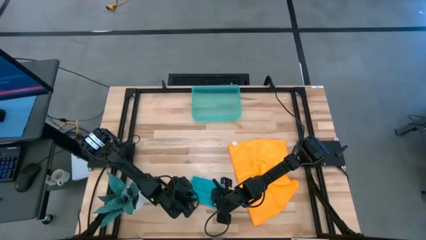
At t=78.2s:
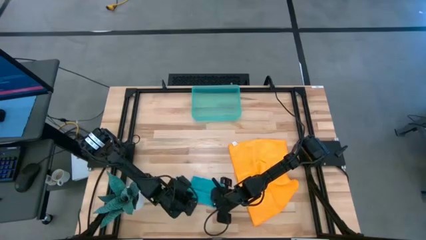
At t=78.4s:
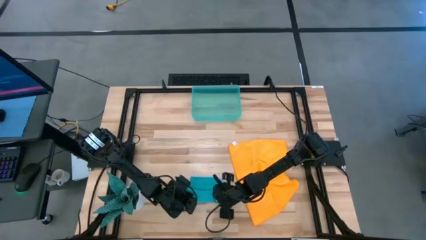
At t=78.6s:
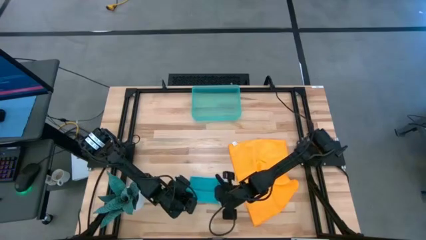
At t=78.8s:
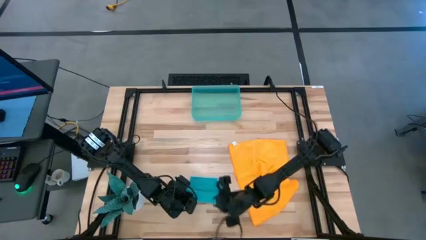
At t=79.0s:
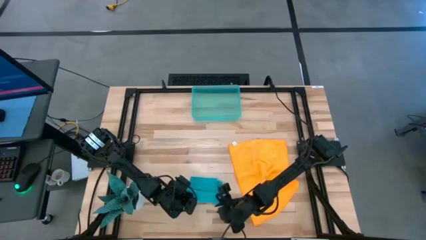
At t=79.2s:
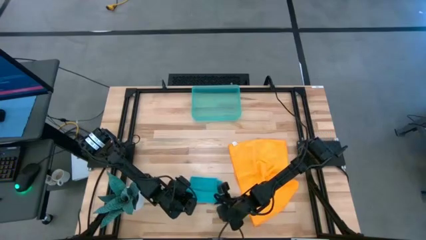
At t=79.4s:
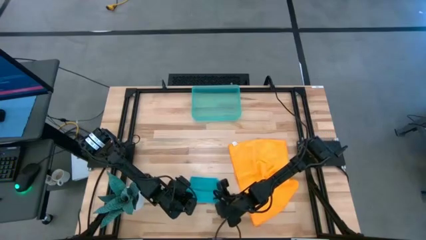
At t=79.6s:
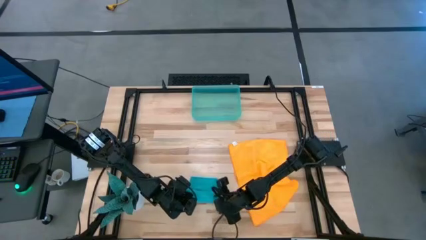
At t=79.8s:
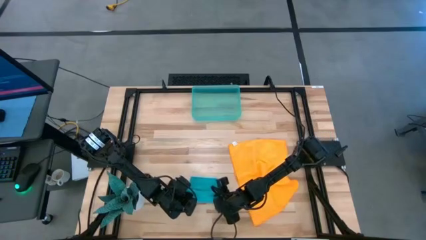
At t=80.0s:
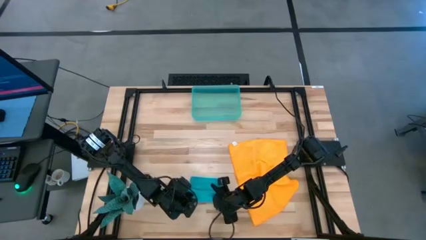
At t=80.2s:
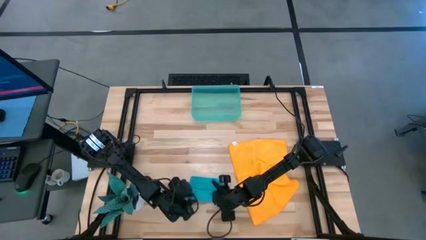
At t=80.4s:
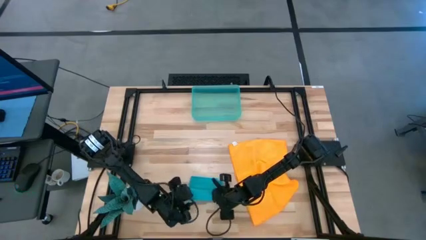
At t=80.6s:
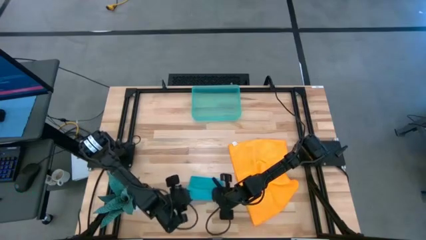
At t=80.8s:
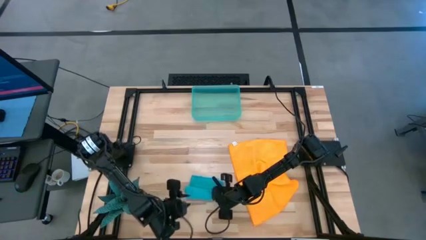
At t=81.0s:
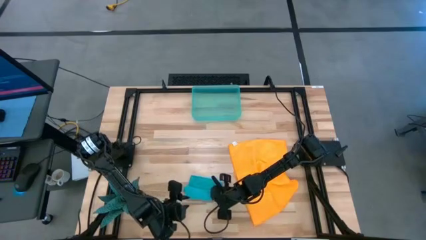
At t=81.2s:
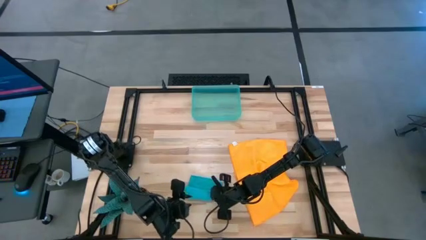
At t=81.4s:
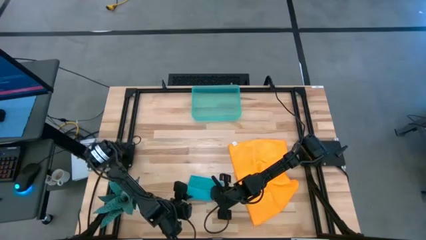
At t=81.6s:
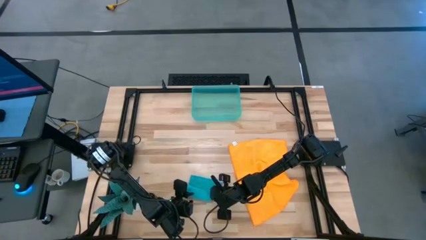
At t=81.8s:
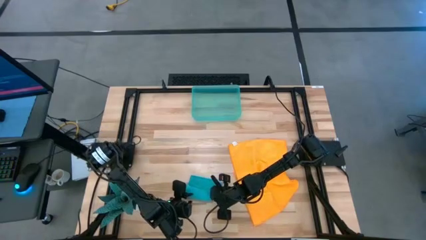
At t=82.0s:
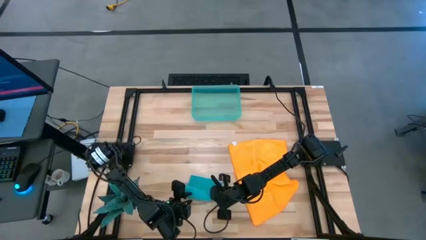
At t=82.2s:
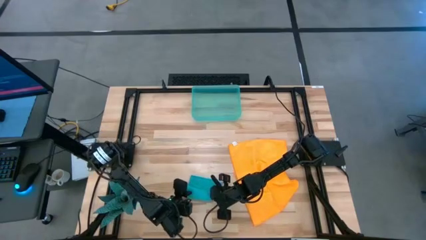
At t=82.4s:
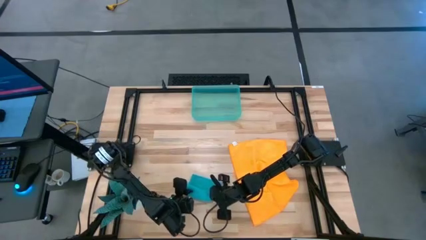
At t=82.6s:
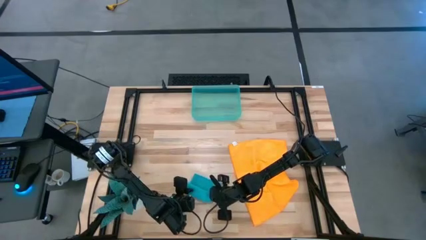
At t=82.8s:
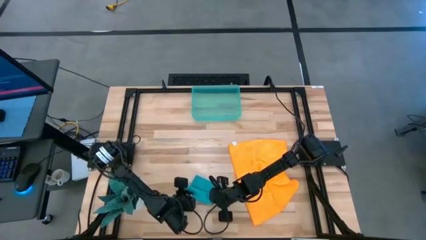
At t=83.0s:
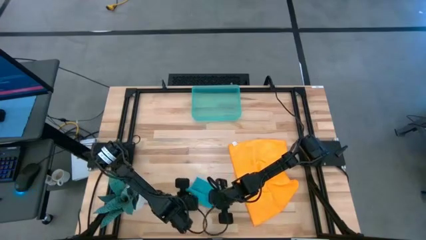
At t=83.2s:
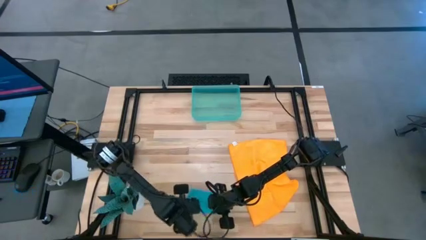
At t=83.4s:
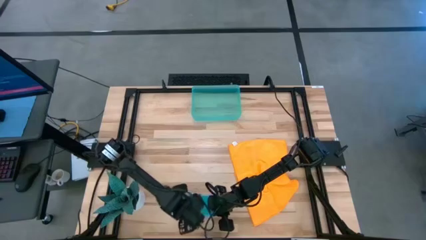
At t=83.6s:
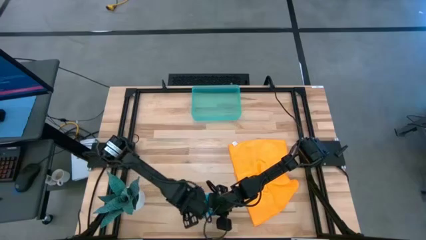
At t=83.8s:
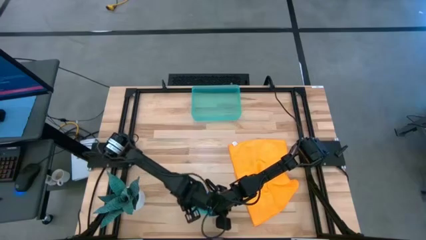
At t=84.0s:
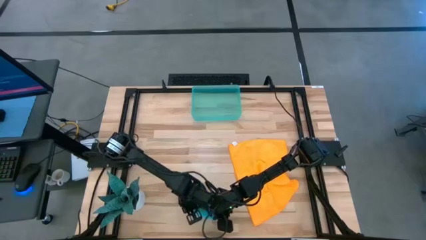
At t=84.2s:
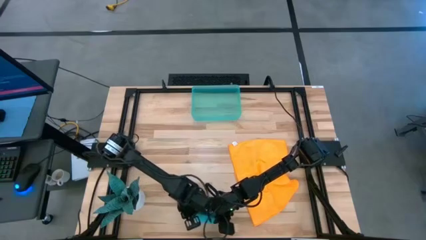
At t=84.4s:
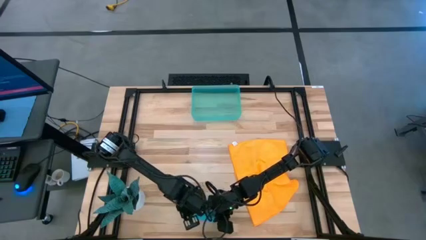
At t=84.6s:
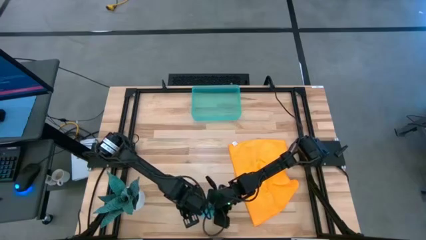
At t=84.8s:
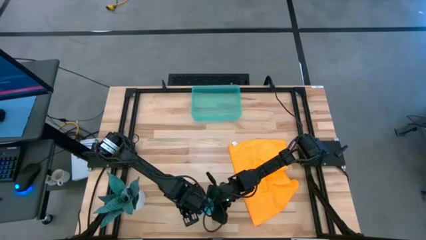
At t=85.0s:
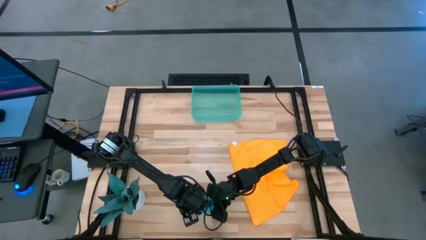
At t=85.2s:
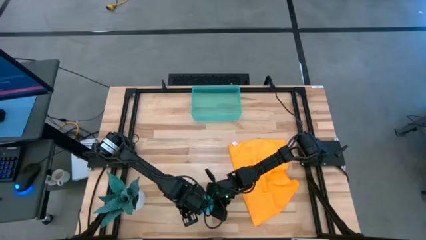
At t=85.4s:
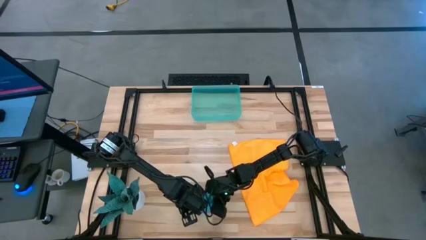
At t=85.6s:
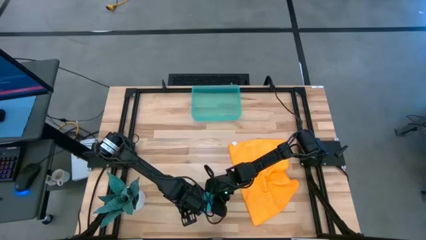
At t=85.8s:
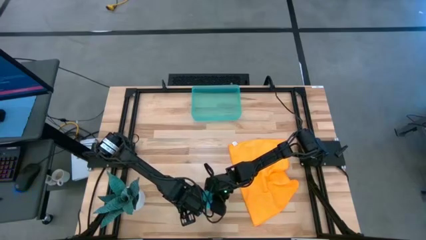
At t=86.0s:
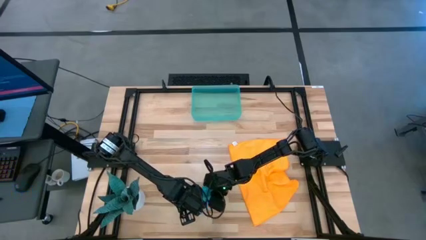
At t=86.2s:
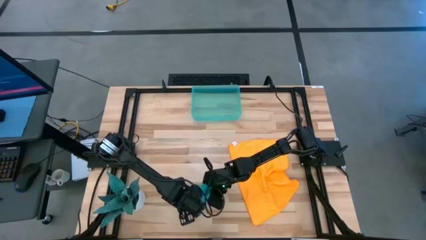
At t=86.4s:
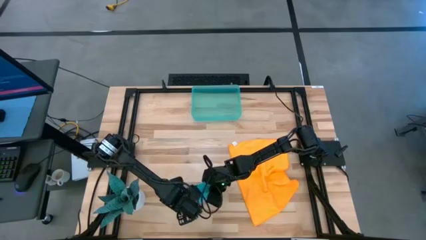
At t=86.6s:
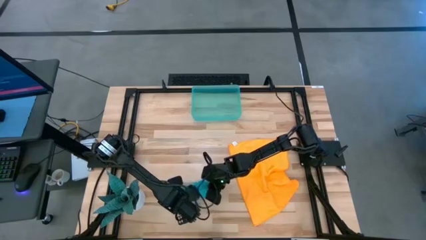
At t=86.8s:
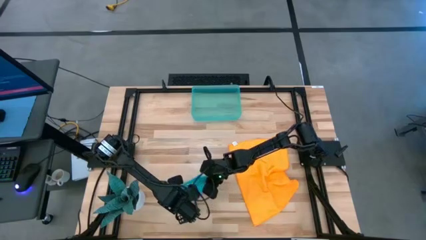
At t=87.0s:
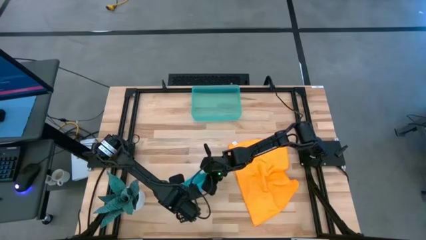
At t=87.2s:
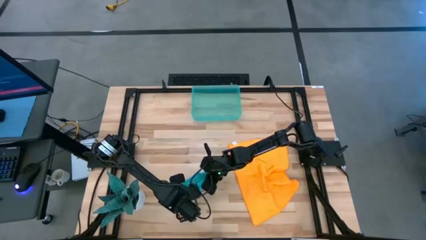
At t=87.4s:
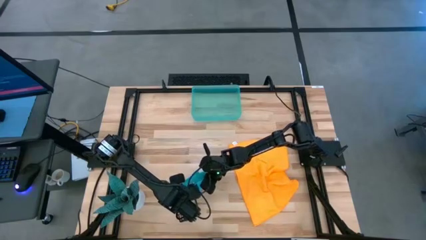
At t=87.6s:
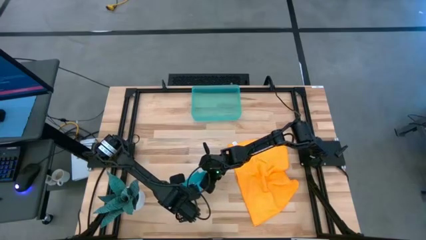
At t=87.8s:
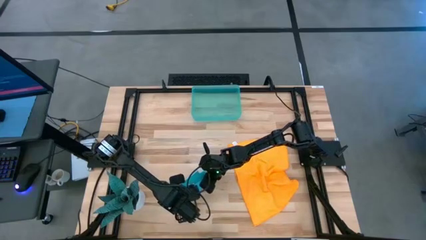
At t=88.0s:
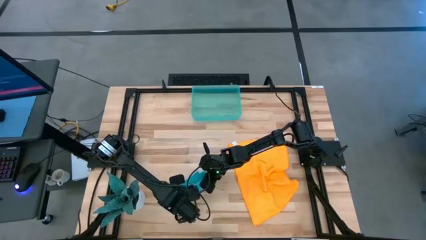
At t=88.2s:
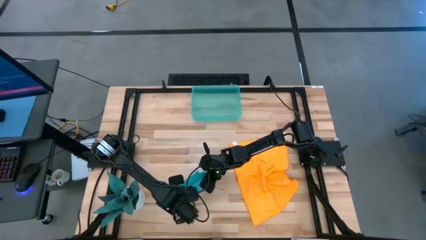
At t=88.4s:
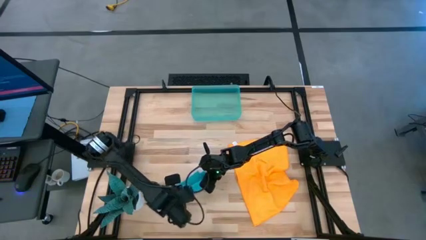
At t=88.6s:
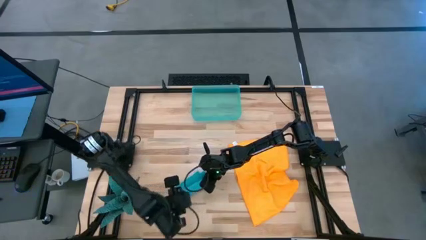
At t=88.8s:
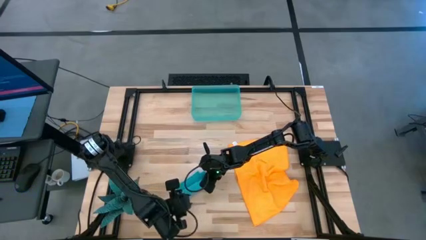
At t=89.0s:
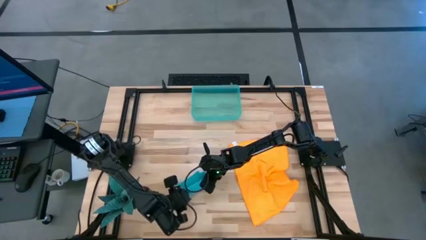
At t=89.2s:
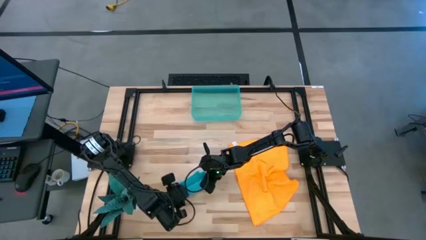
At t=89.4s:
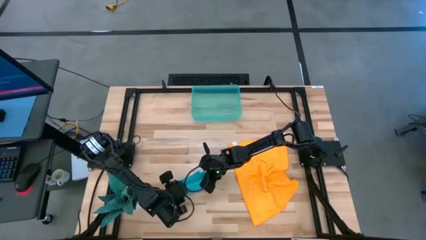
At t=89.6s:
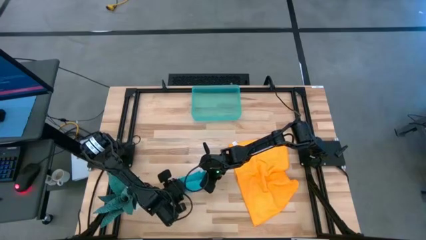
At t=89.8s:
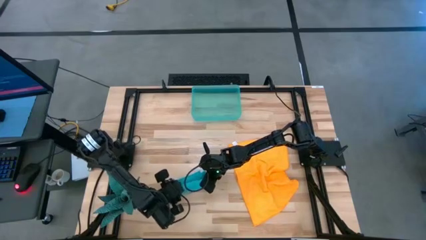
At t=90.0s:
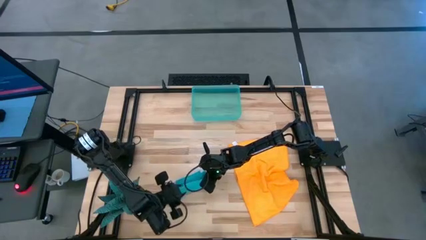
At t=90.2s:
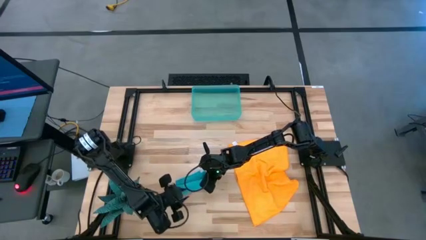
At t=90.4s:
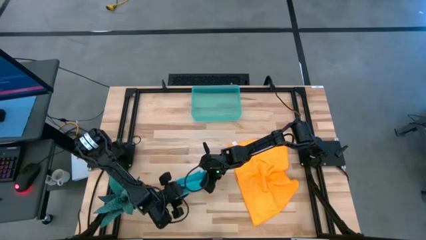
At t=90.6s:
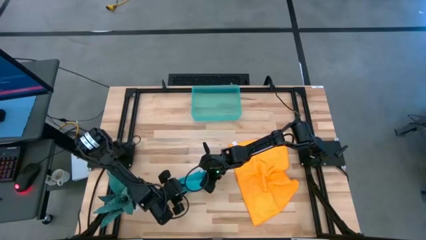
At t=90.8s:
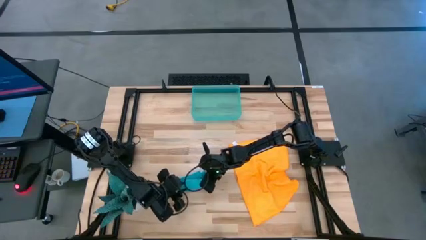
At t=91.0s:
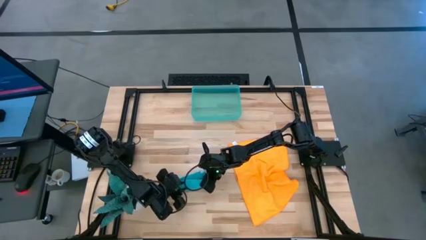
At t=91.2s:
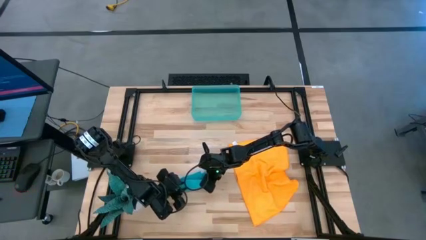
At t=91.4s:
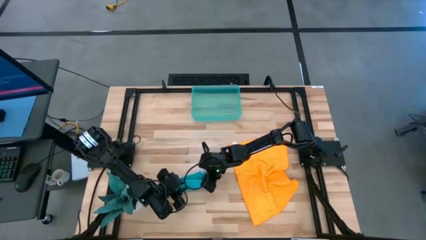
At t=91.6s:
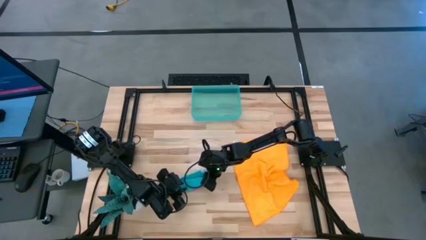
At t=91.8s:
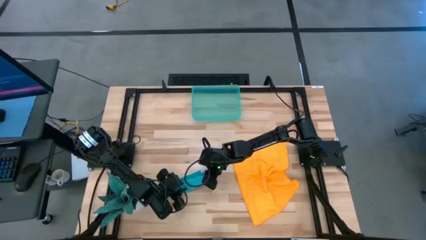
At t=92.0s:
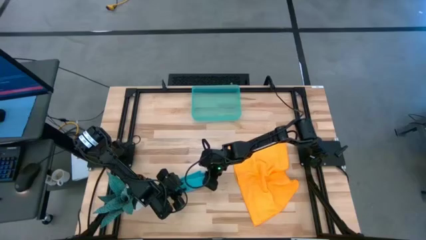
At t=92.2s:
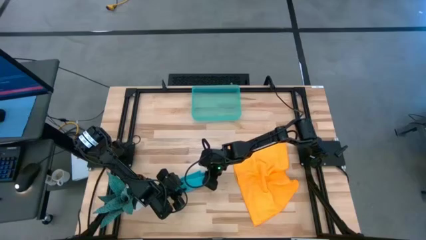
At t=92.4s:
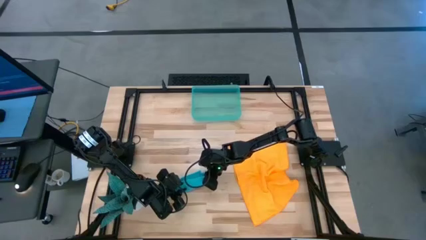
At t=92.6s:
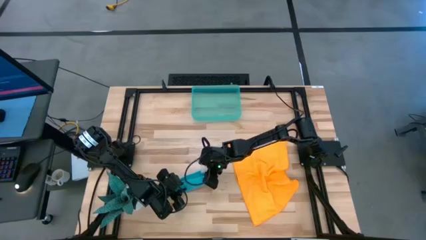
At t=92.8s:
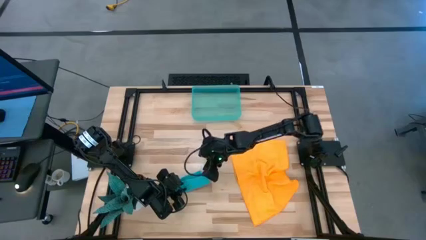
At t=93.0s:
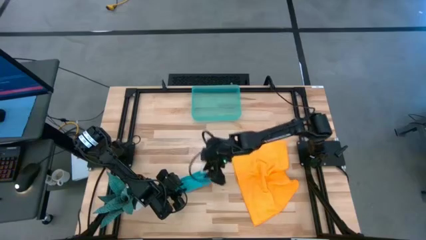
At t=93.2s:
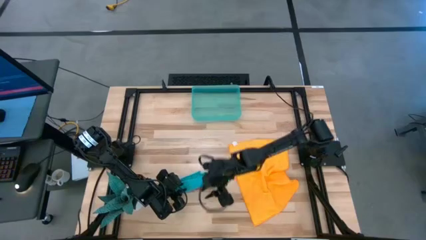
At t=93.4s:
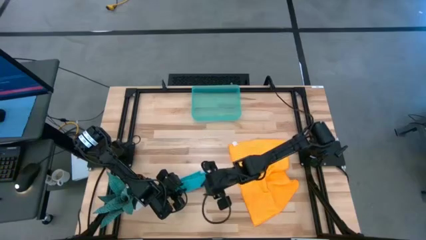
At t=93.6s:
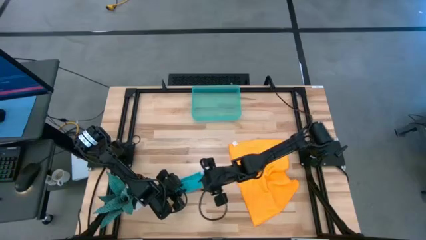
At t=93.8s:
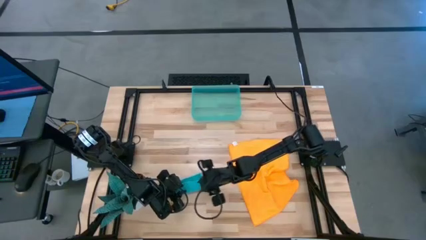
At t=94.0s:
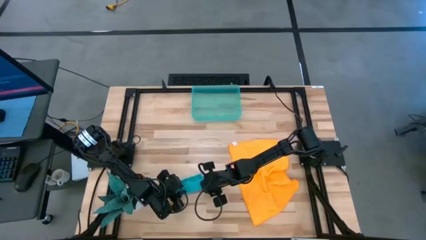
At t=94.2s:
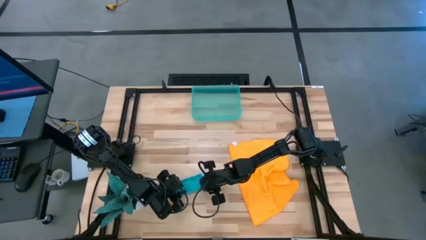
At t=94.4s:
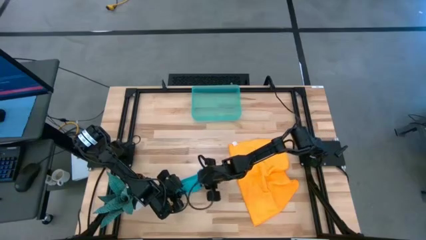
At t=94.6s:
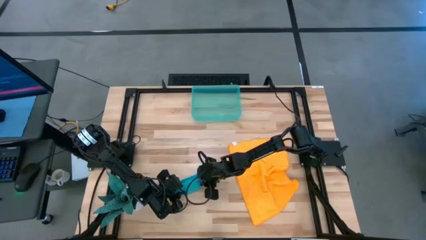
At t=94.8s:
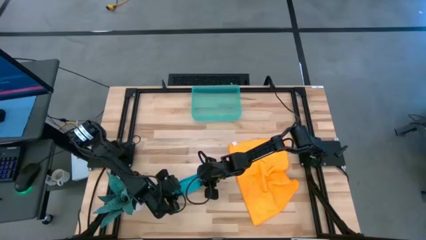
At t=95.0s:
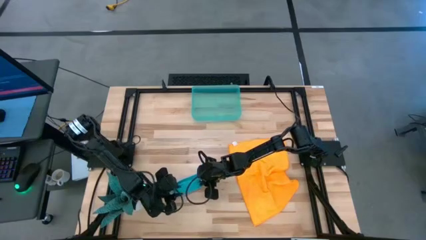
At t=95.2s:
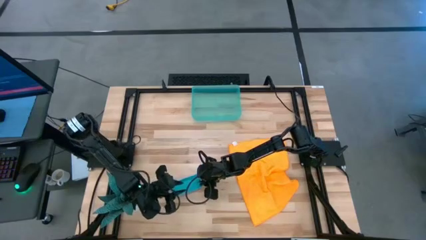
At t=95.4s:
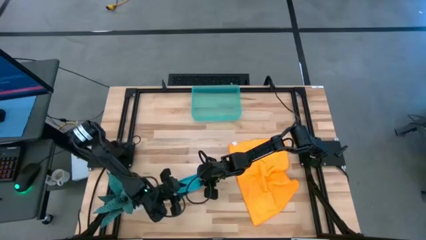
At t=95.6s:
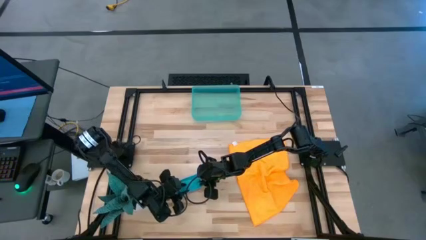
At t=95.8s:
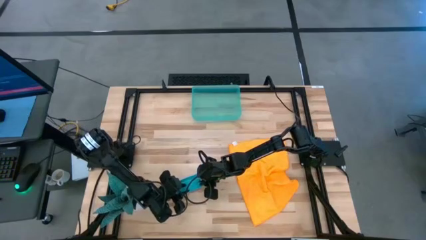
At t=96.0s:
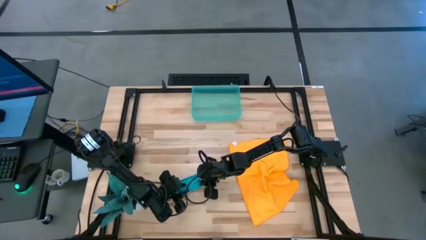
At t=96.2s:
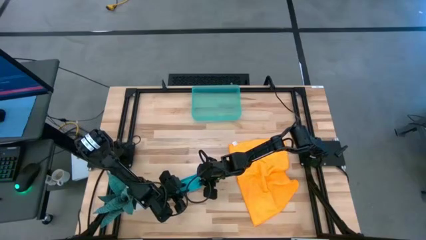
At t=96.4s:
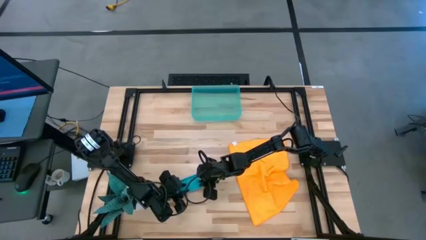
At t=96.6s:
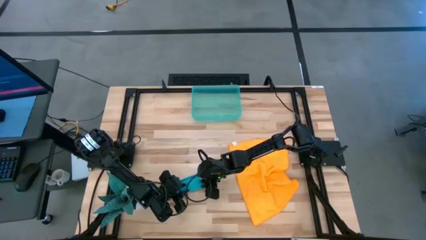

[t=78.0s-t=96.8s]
Task: Roll microfiber towels into tight, uniform cylinder then place into a basket
Roll the blue microfiber cloth
